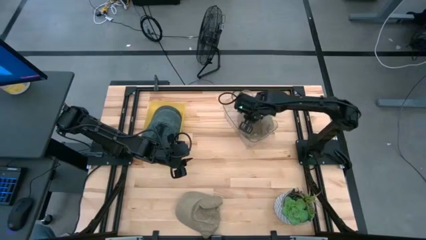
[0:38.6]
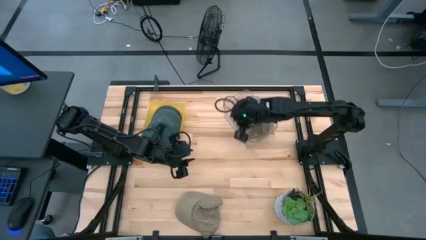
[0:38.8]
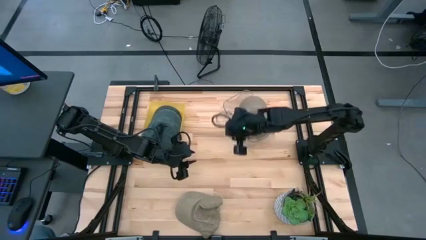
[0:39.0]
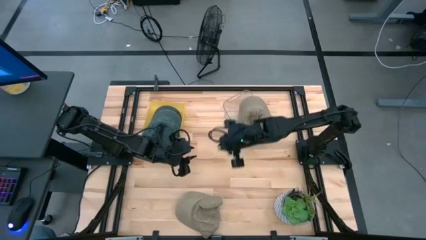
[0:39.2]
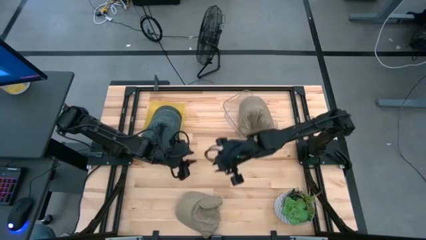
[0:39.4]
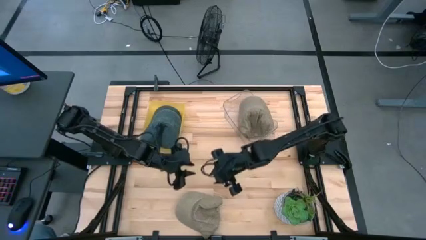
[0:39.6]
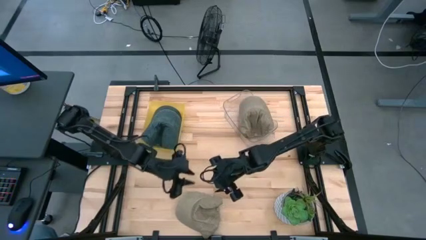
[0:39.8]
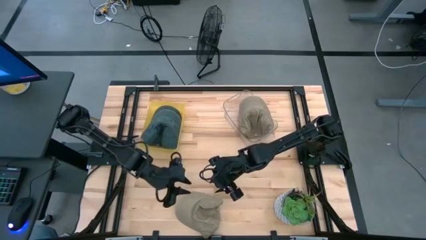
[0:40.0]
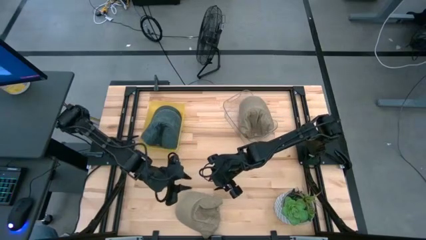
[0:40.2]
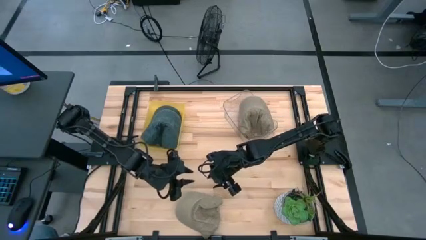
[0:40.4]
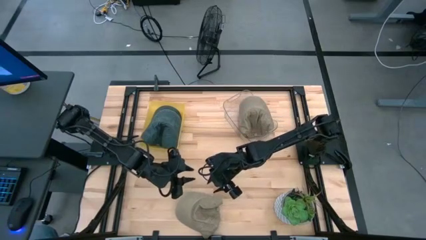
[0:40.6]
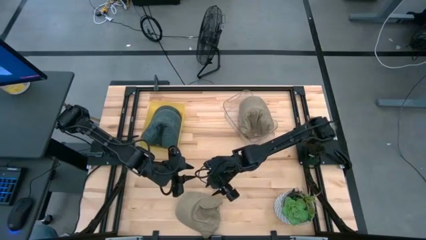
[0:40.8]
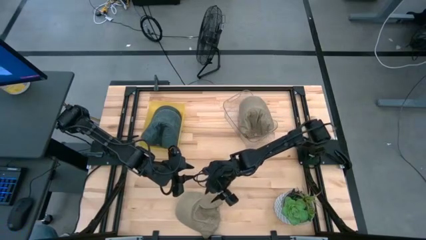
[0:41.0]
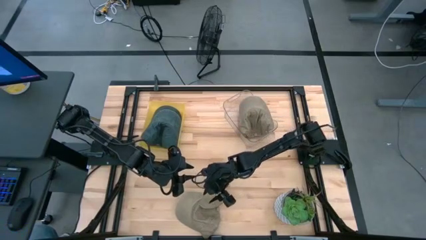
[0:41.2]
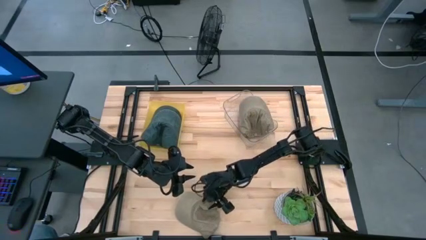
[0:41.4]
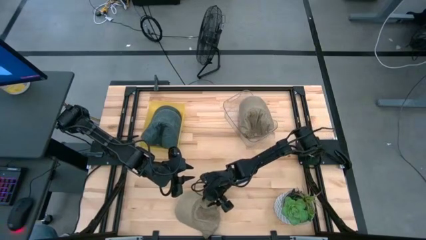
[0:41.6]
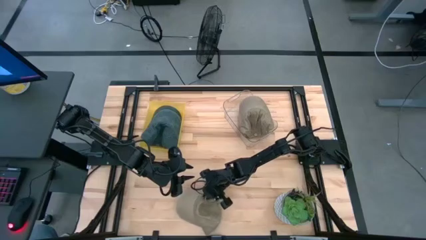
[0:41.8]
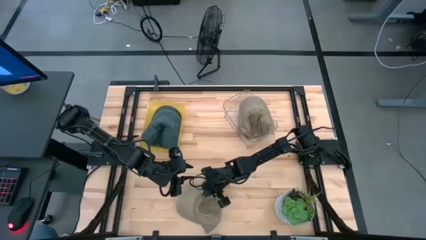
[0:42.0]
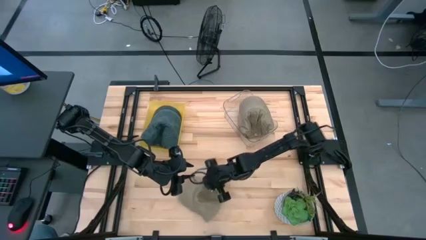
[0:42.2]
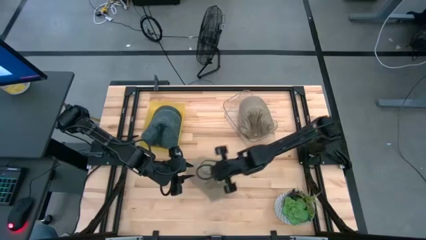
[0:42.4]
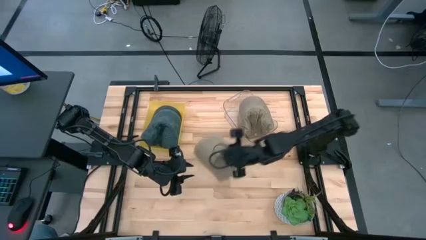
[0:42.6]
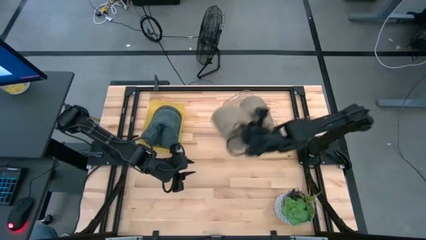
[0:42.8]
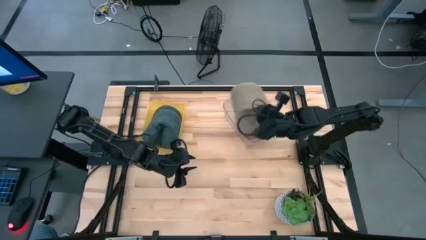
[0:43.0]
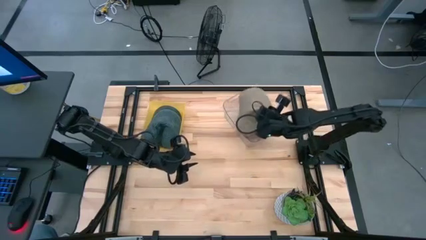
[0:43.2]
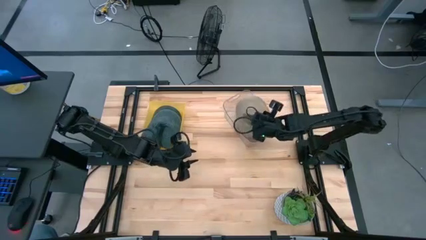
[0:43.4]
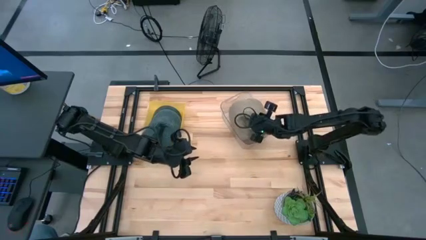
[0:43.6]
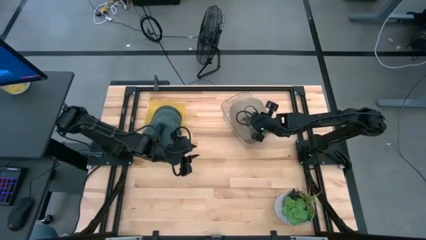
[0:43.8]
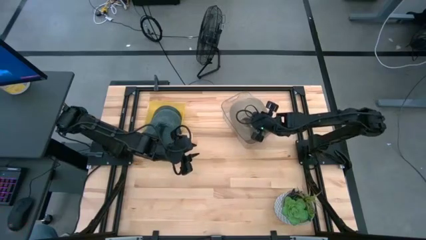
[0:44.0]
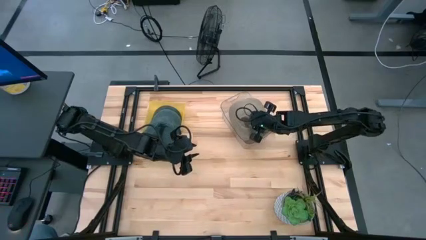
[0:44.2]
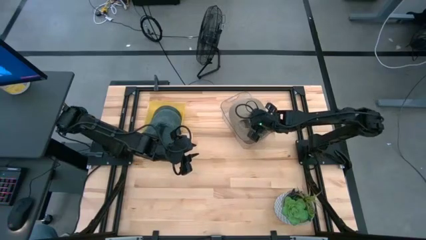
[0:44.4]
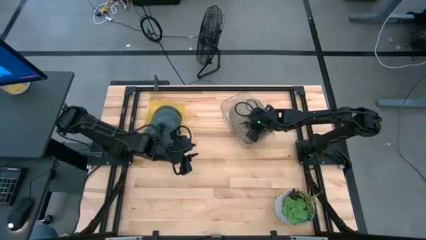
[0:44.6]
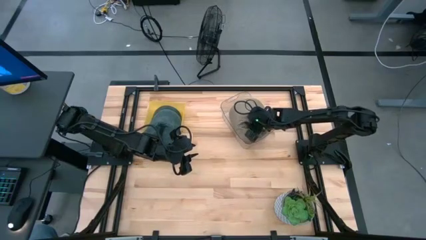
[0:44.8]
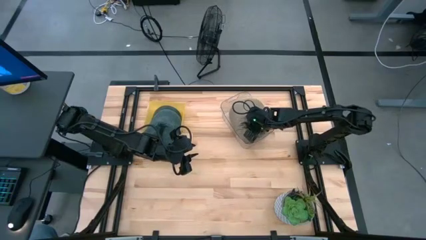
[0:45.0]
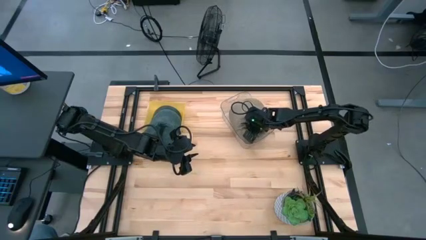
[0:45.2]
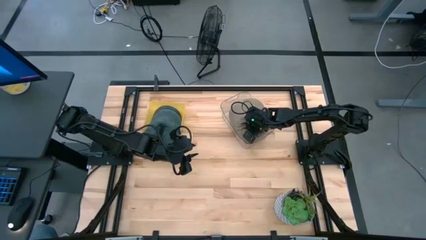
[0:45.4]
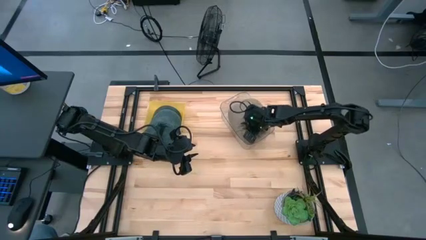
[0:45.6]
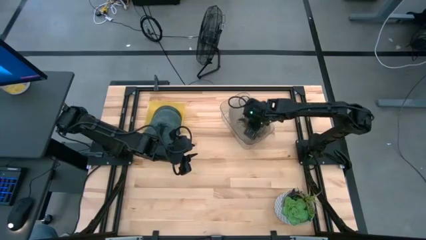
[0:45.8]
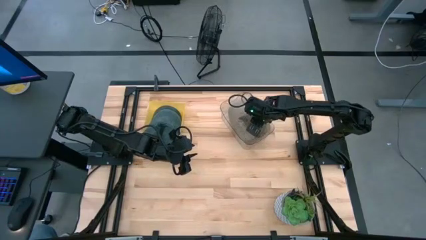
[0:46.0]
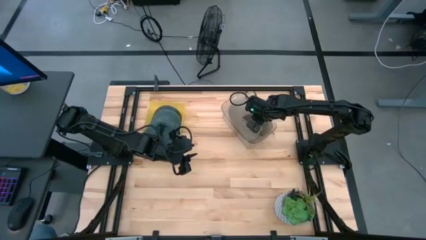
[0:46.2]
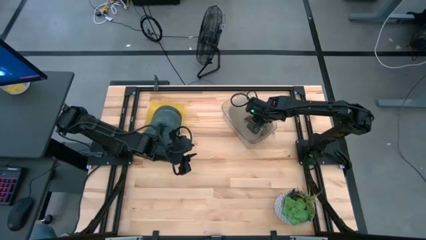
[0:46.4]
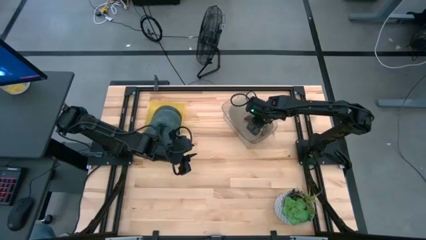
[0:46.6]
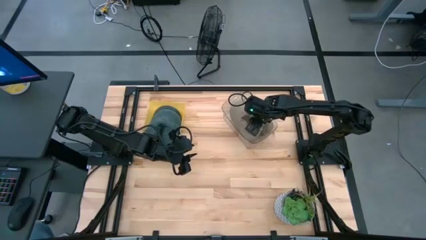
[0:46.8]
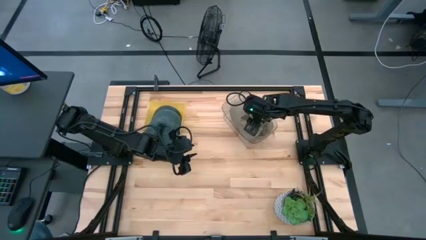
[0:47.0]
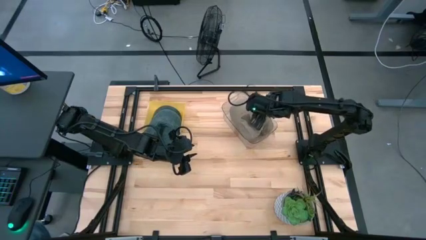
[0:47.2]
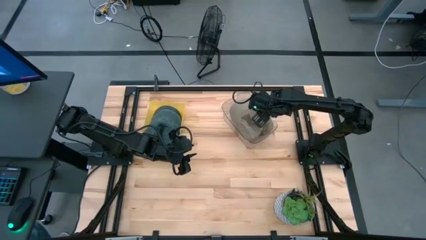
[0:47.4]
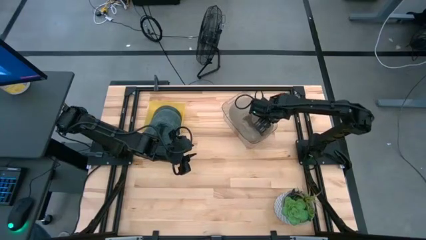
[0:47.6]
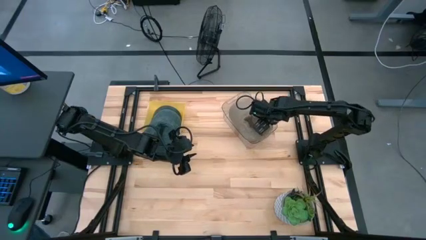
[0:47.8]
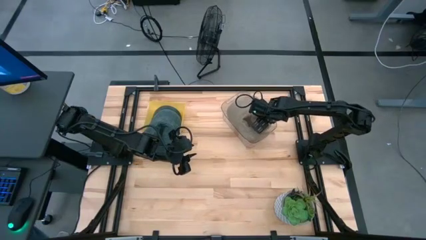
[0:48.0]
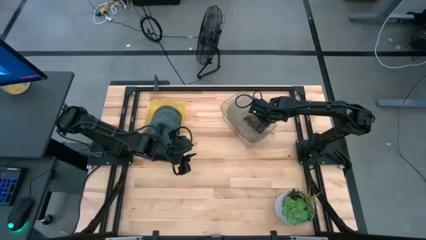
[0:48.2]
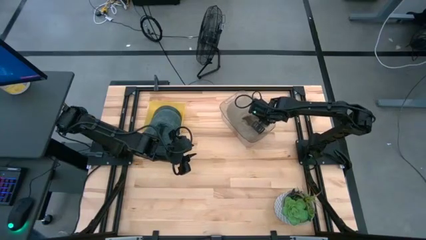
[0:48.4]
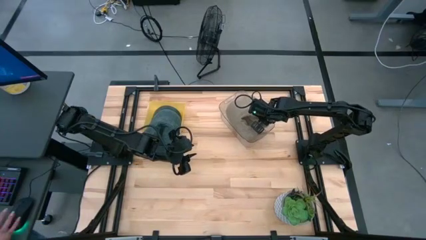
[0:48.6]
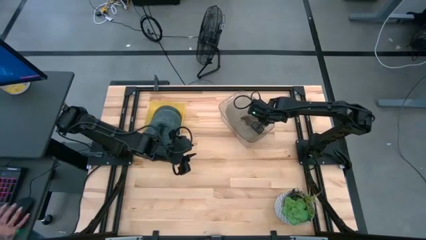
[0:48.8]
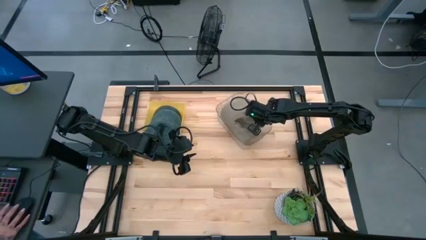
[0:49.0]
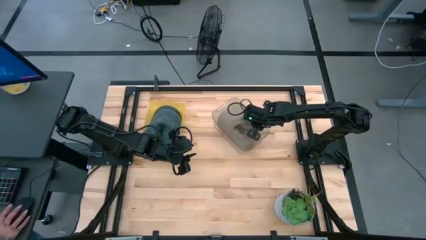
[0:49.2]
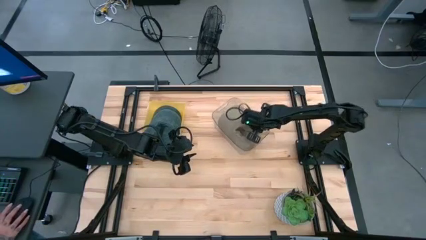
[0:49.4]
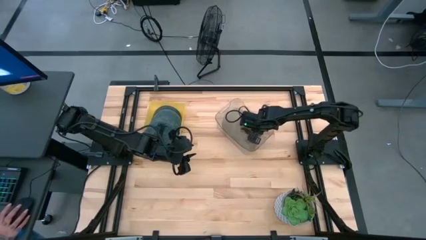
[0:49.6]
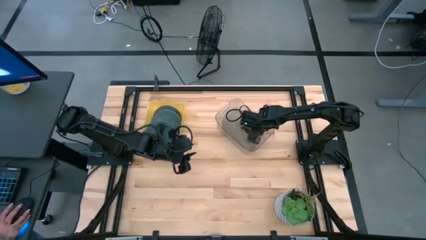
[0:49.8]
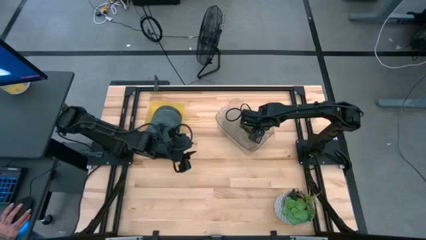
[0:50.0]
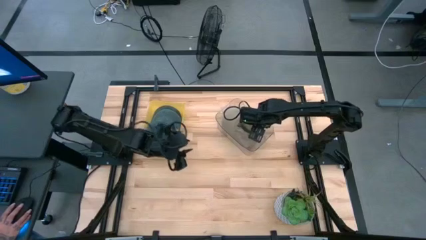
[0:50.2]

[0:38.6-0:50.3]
Task: Pick & Place hat
Put the brown cap into the transparent bin

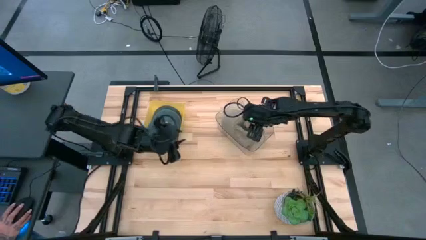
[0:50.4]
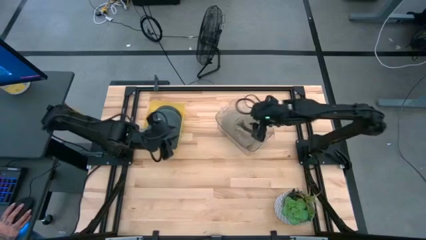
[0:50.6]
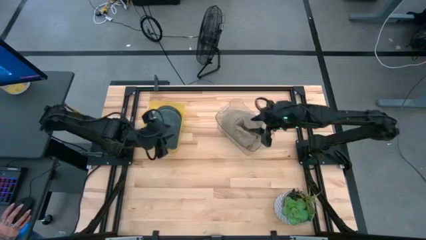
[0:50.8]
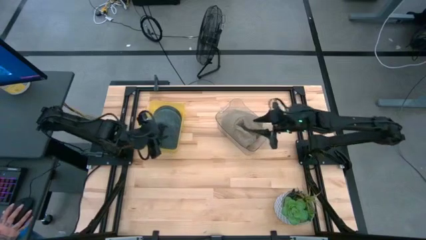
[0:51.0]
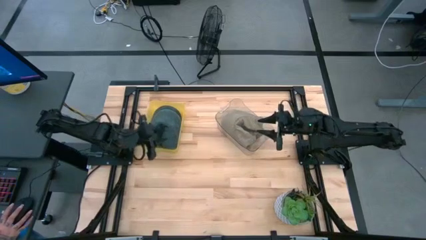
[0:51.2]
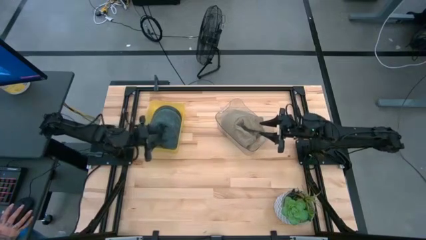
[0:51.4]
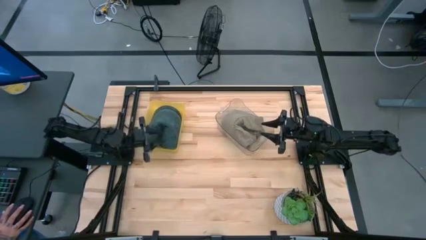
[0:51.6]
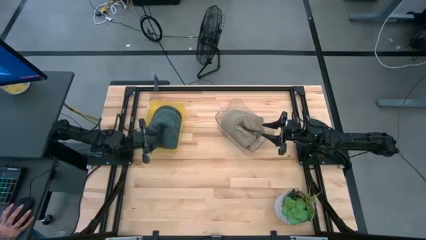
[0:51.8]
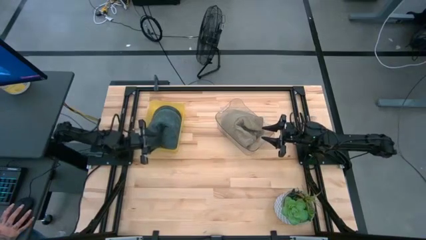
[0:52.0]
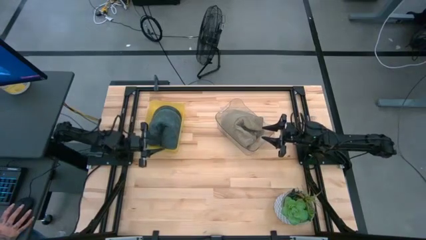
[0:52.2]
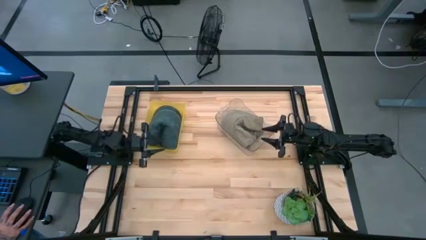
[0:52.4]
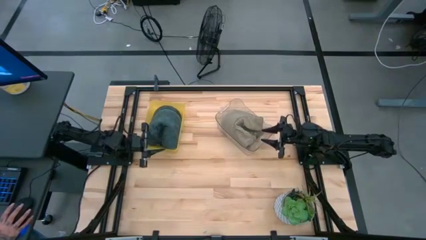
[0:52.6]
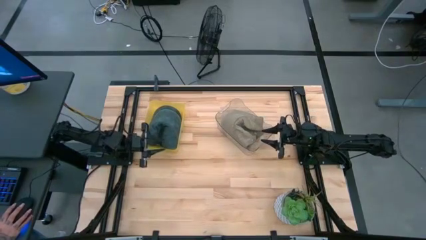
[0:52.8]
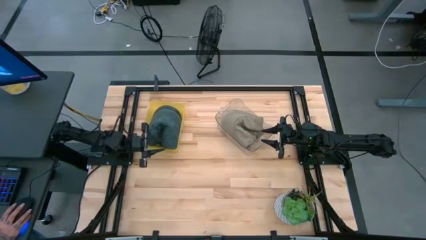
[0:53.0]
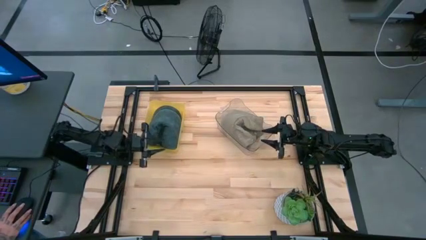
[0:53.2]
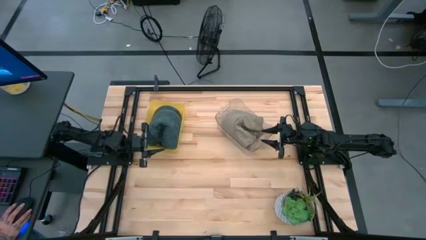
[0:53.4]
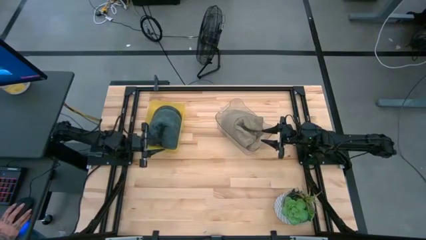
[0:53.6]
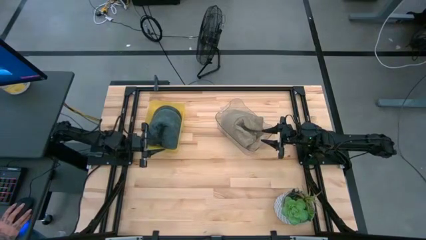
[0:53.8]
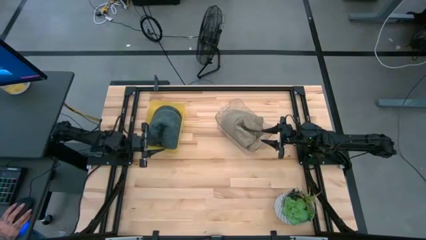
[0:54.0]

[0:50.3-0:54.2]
Return to Home Position
